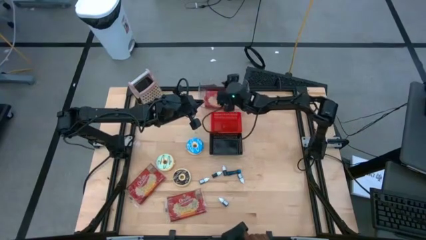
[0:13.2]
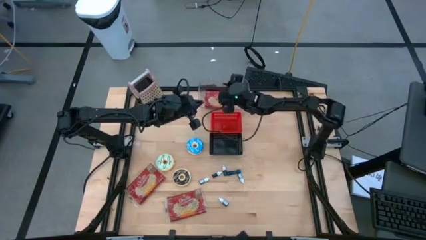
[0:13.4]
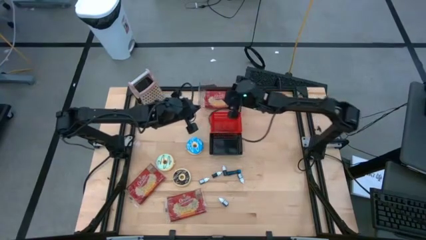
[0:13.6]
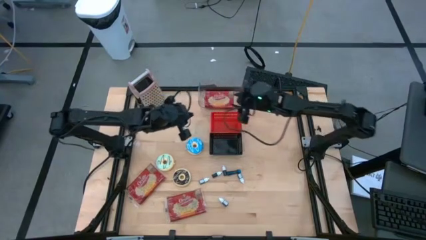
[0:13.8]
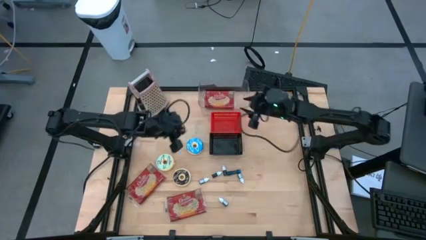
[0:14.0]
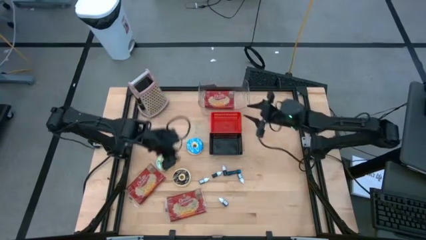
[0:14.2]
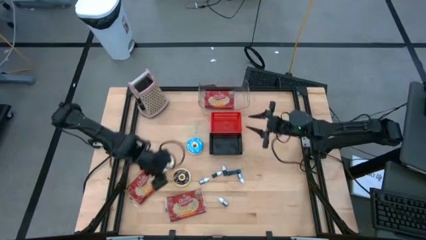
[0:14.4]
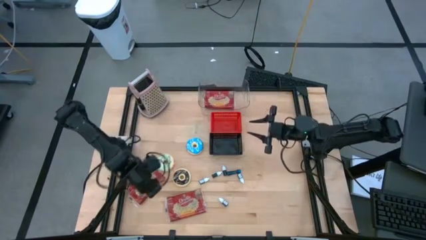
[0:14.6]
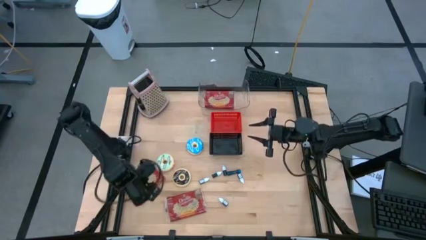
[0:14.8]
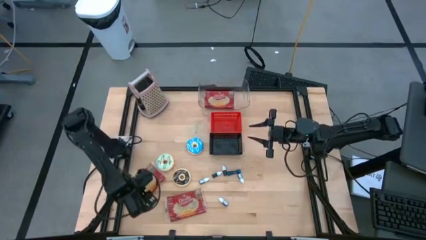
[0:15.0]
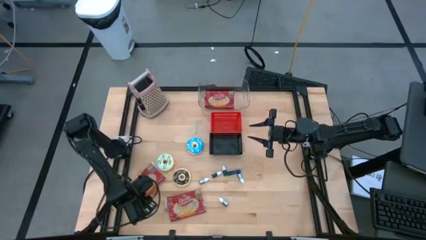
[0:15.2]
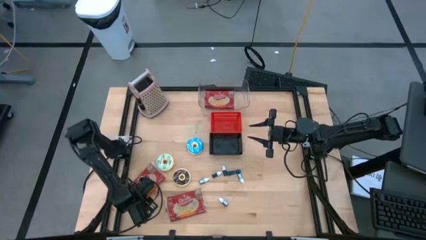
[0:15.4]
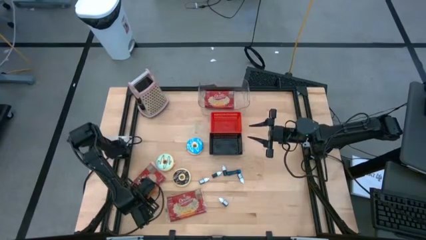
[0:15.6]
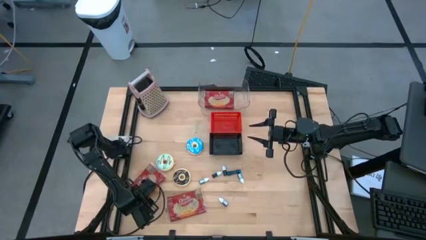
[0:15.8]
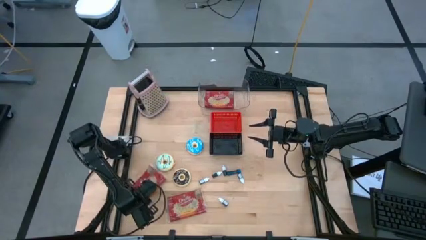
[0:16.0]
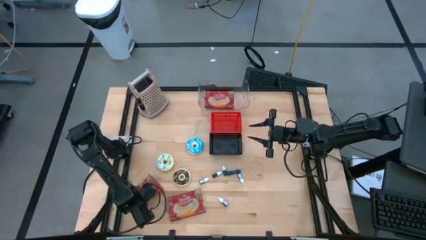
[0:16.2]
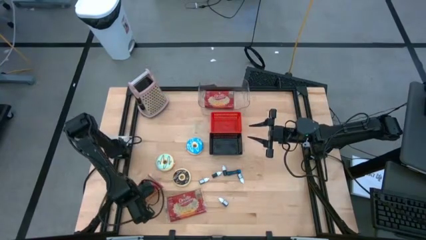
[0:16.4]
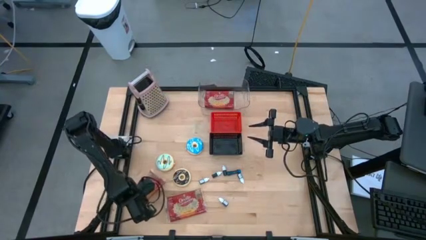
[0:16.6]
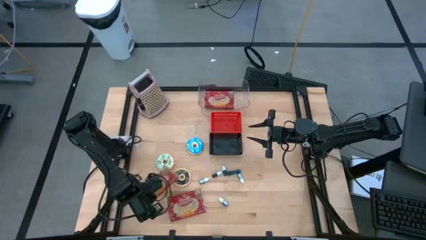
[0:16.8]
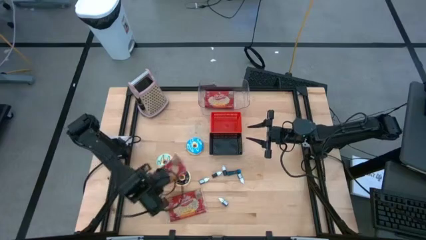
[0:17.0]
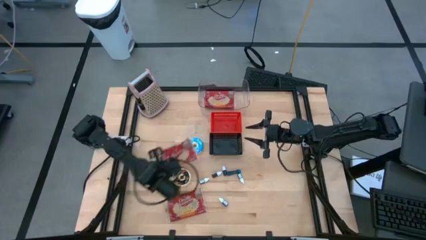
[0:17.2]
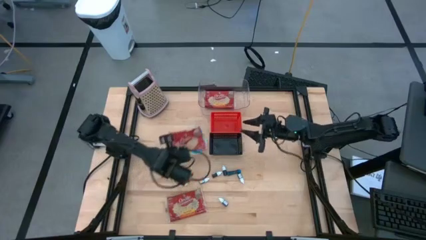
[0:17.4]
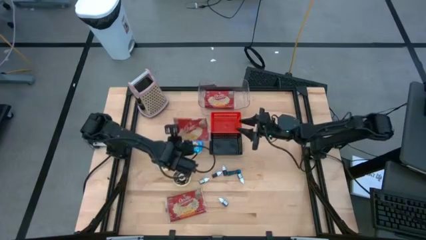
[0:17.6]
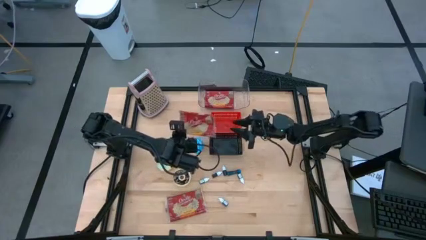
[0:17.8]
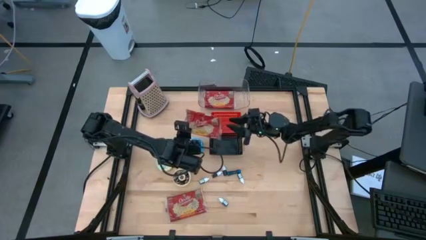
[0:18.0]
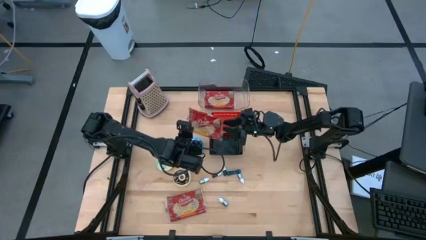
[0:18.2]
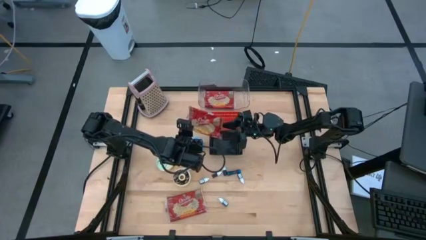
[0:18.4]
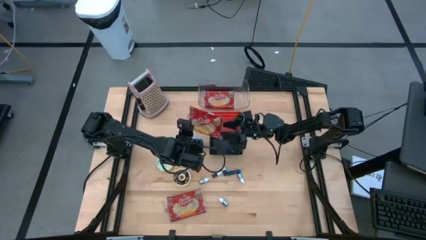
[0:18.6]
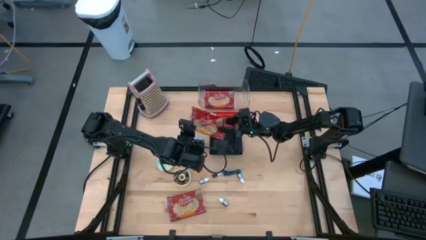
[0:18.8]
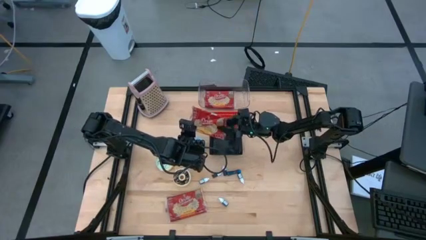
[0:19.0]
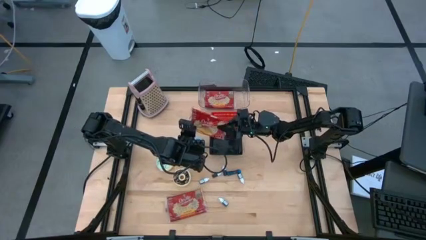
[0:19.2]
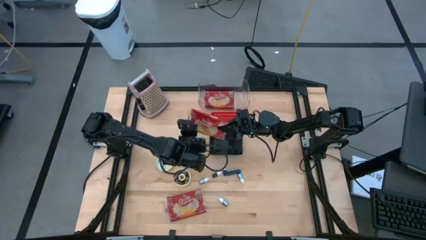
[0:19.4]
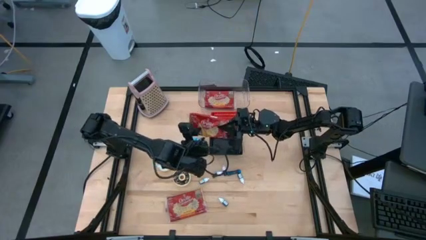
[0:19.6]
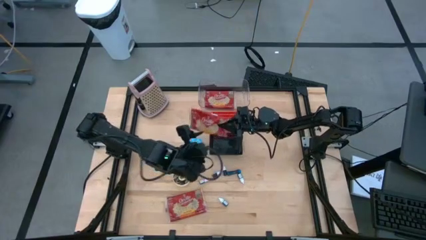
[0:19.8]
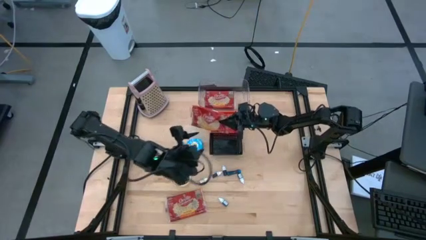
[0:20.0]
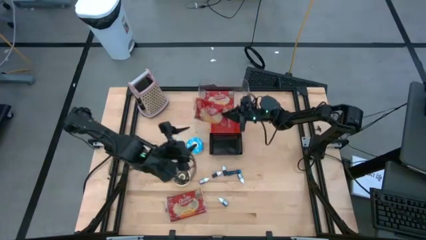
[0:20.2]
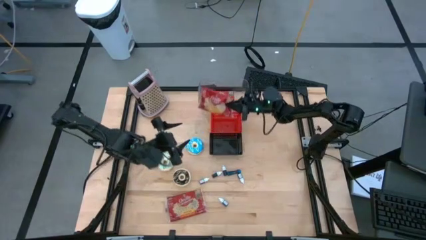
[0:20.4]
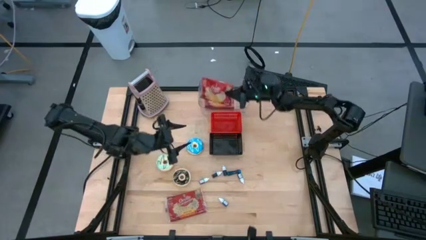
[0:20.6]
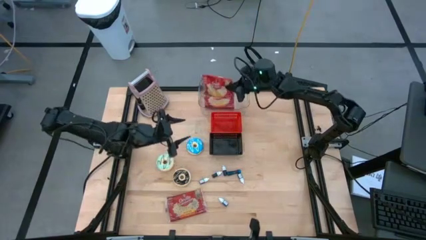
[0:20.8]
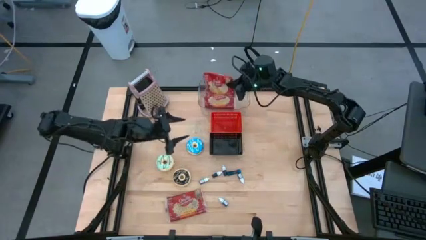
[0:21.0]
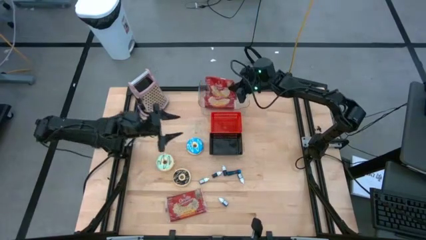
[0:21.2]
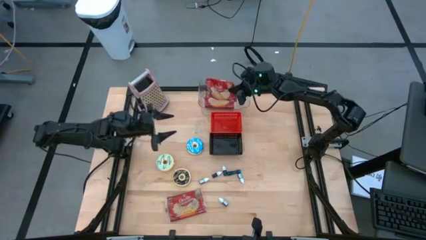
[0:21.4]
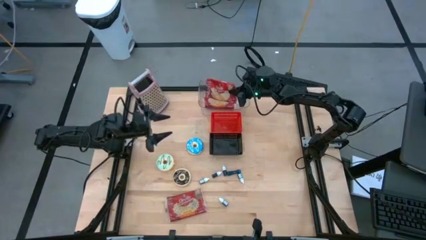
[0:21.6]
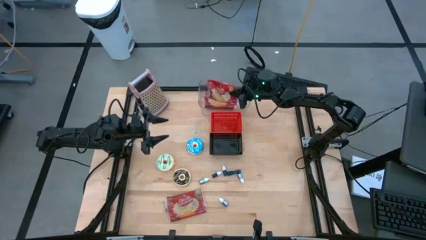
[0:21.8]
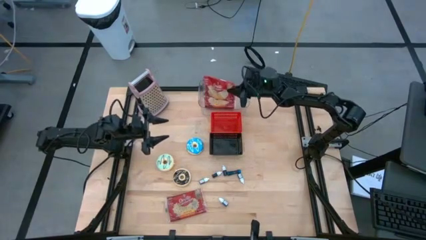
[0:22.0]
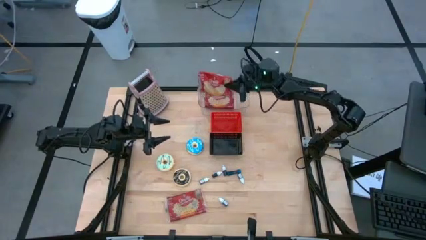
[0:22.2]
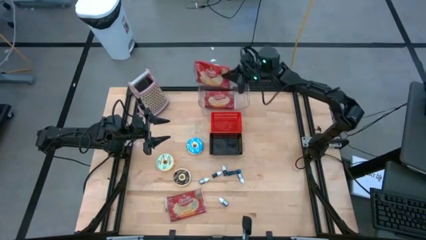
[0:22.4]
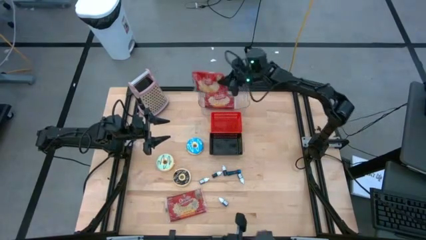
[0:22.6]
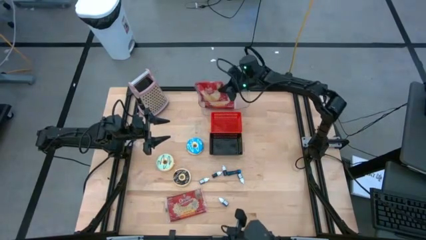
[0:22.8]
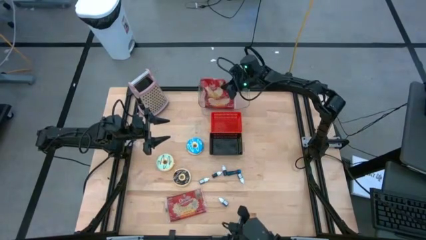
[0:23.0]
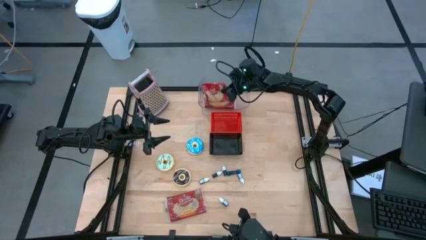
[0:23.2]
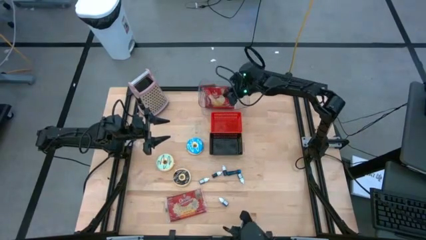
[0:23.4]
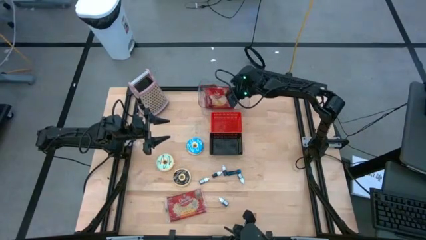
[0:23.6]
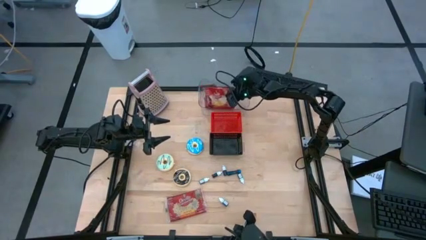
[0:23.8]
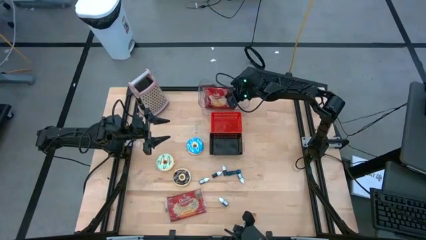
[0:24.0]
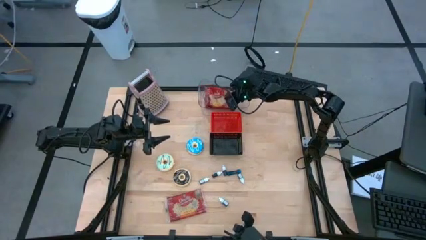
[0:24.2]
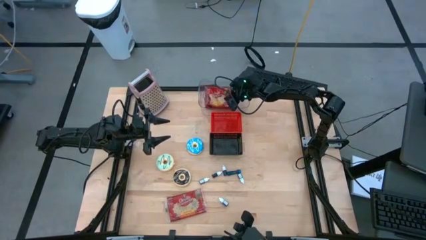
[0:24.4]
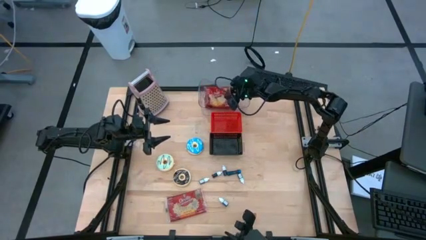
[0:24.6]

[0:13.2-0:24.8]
Put the left popcorn pack into the transparent bin

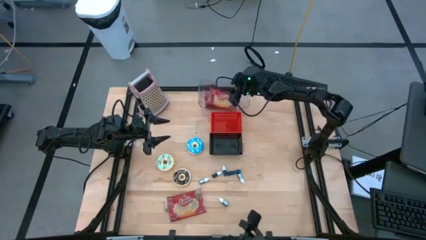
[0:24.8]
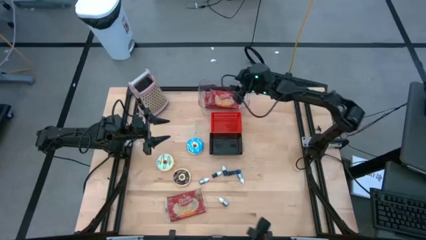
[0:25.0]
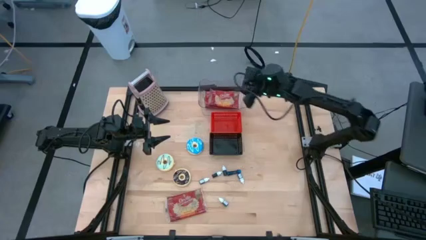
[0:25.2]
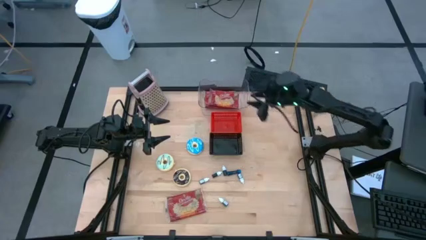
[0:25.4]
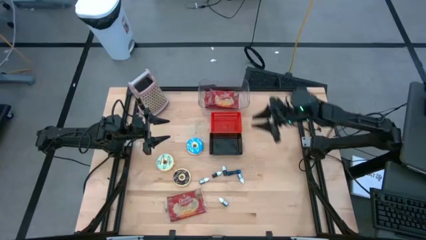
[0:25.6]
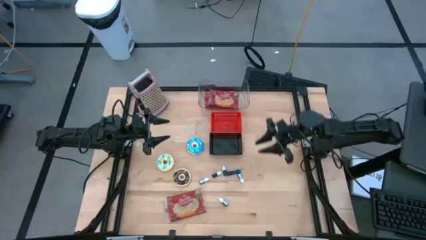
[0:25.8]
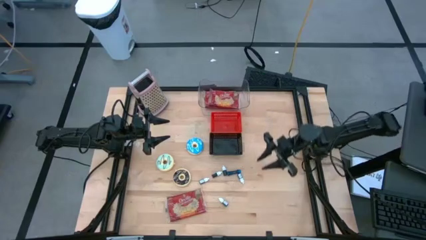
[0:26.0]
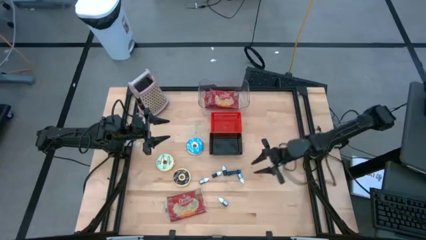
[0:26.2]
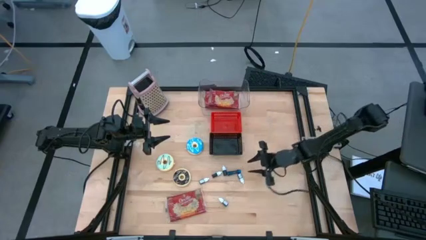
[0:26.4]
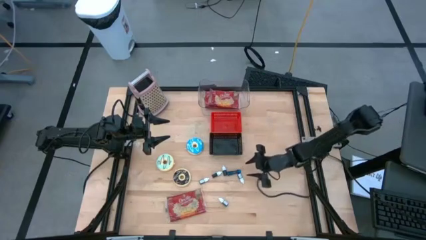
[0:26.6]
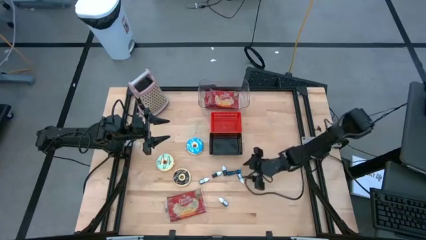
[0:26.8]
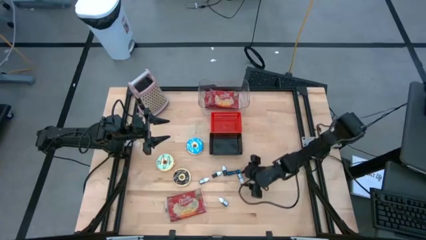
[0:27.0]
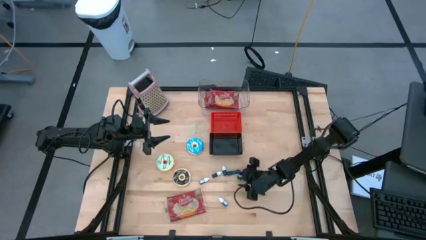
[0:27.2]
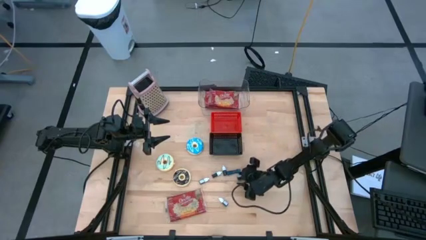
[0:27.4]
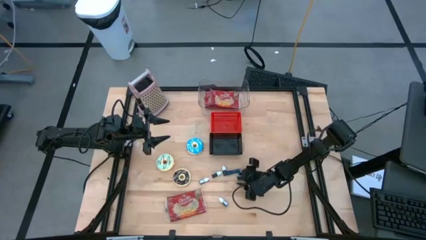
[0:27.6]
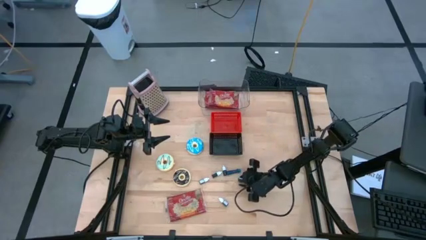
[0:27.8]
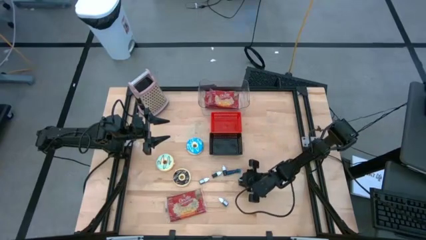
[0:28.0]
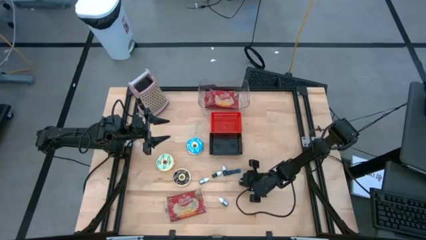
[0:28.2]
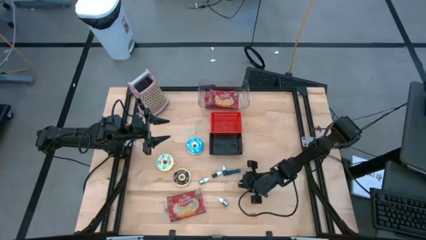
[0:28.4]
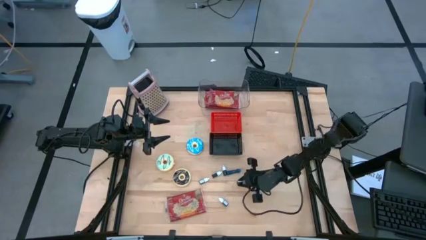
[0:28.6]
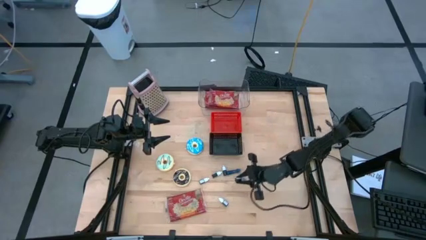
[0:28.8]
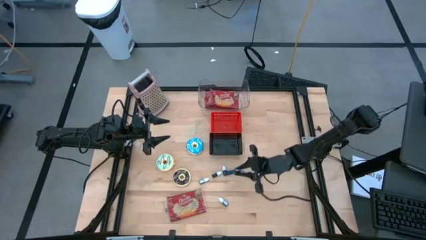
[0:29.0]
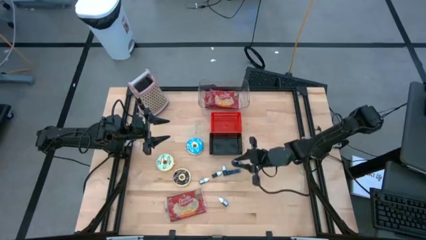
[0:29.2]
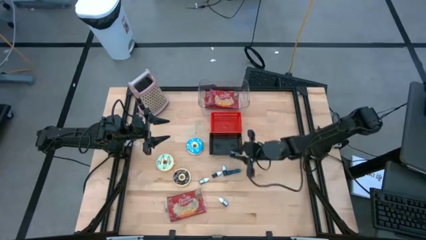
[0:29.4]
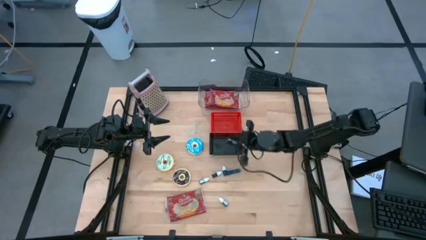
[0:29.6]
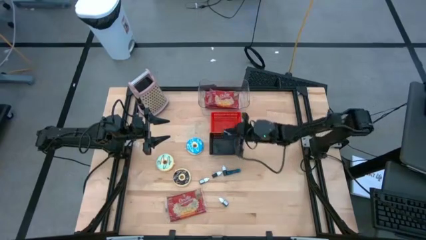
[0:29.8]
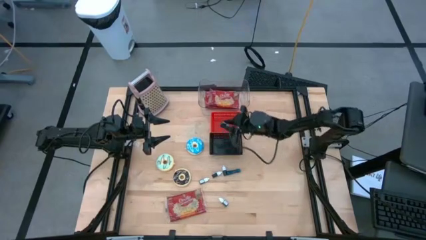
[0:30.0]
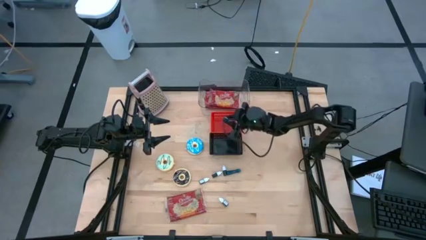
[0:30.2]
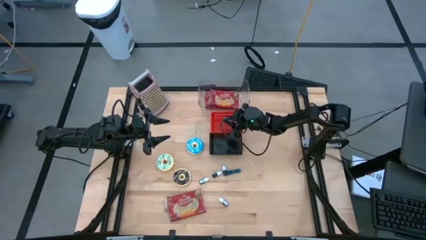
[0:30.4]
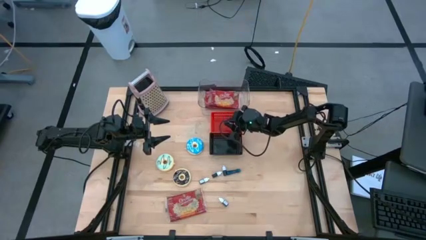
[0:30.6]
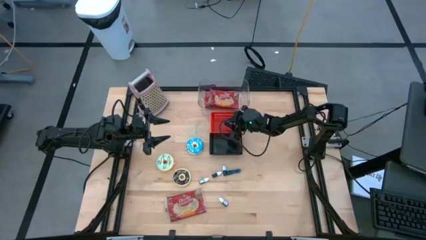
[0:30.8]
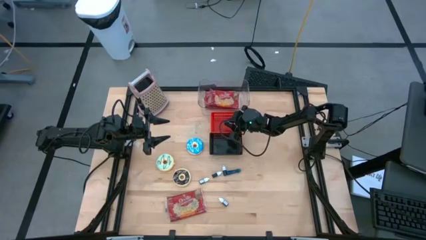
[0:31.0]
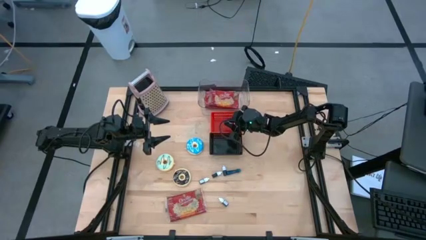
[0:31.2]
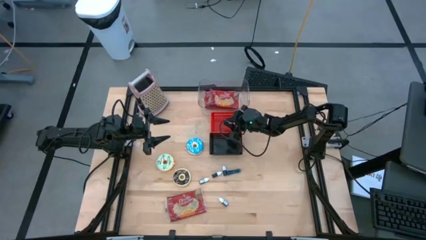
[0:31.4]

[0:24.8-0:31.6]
Put the green food coloring into the red bin
